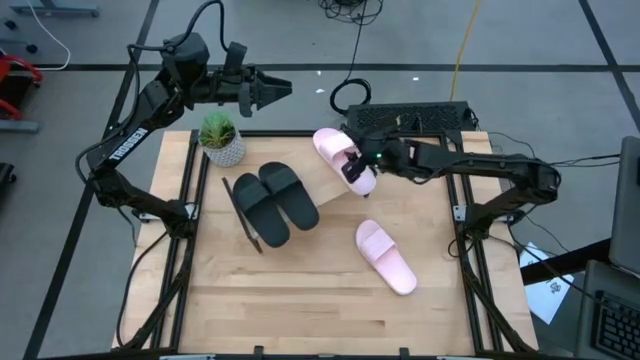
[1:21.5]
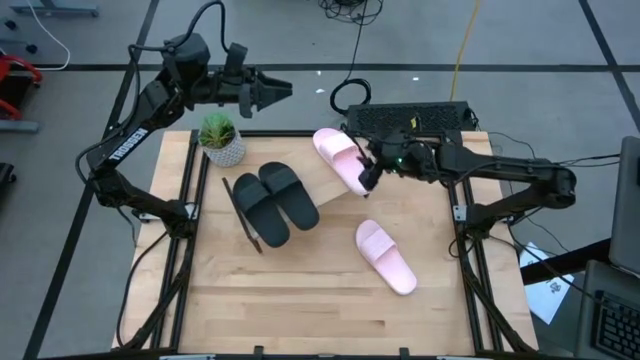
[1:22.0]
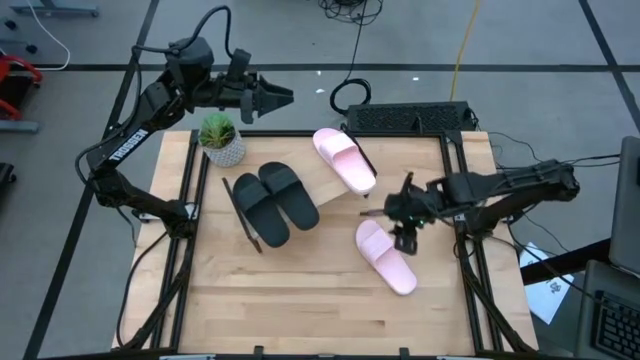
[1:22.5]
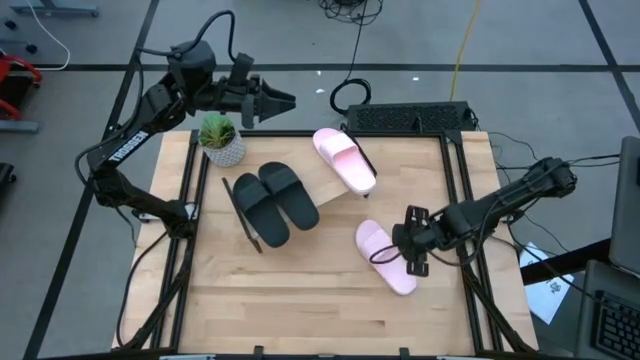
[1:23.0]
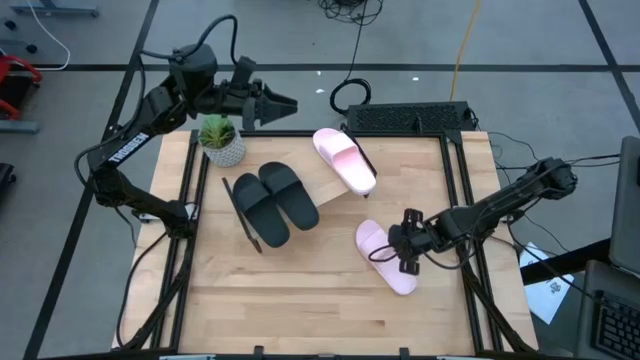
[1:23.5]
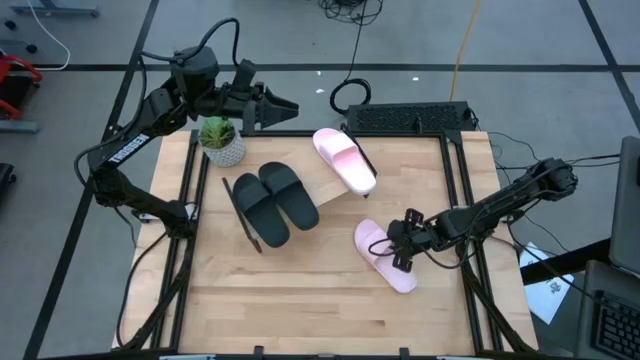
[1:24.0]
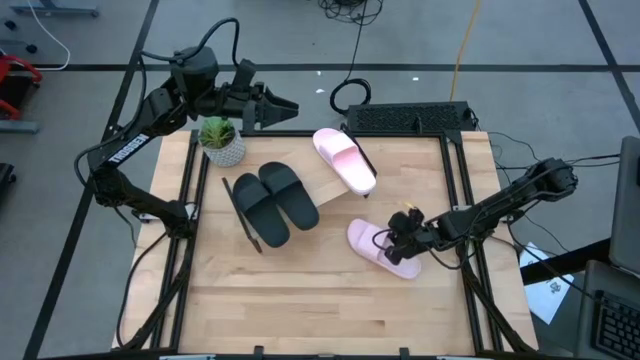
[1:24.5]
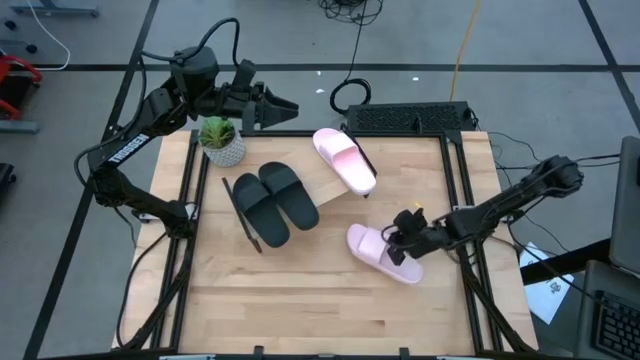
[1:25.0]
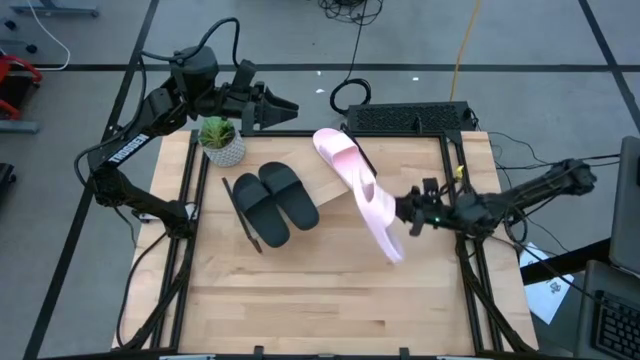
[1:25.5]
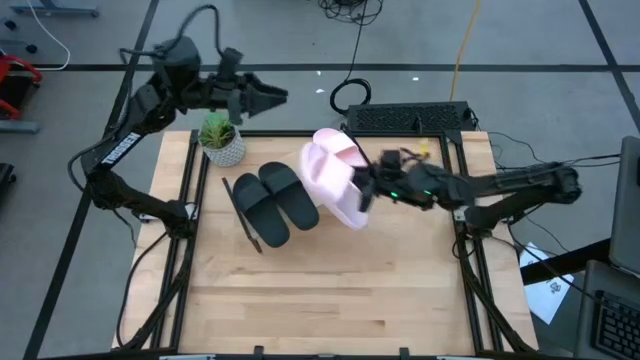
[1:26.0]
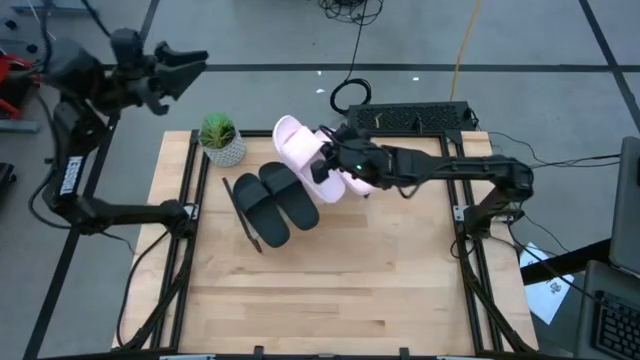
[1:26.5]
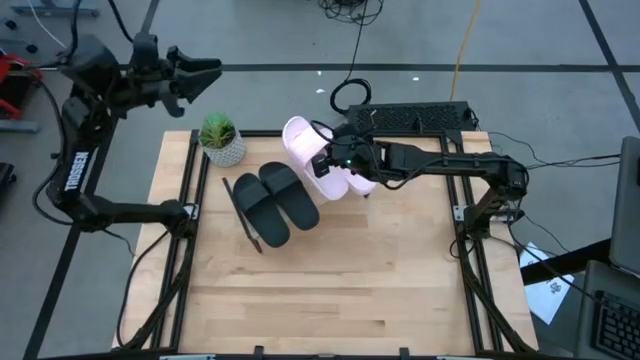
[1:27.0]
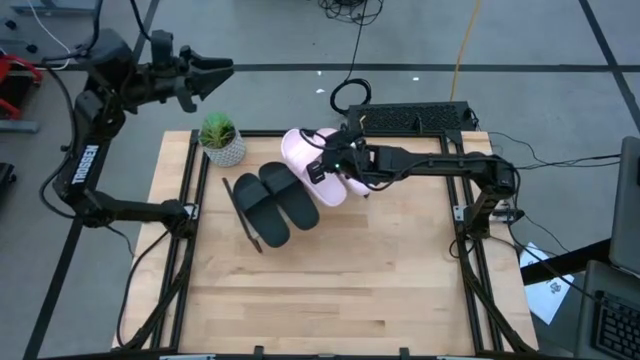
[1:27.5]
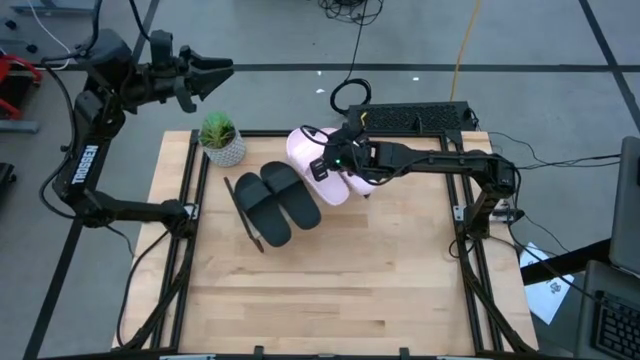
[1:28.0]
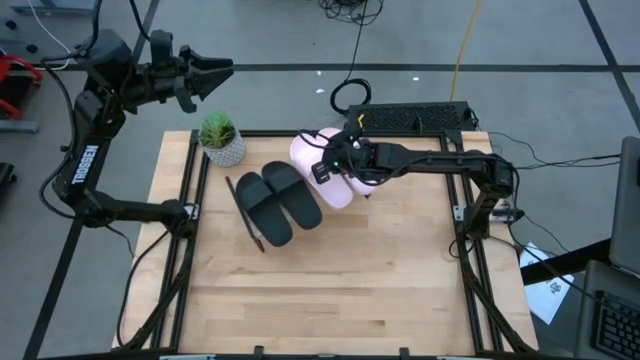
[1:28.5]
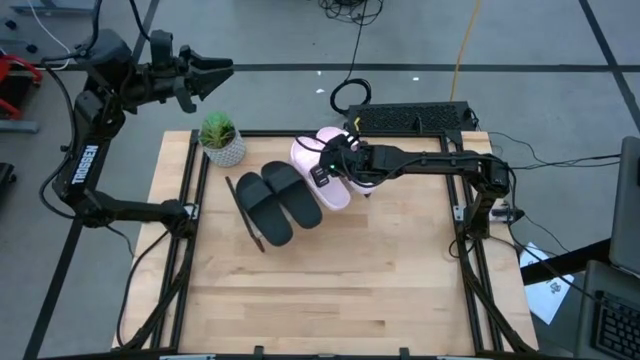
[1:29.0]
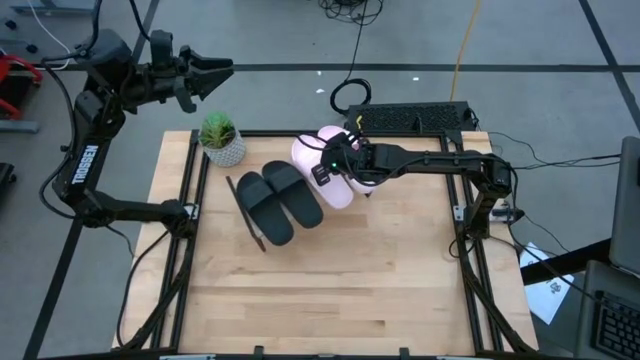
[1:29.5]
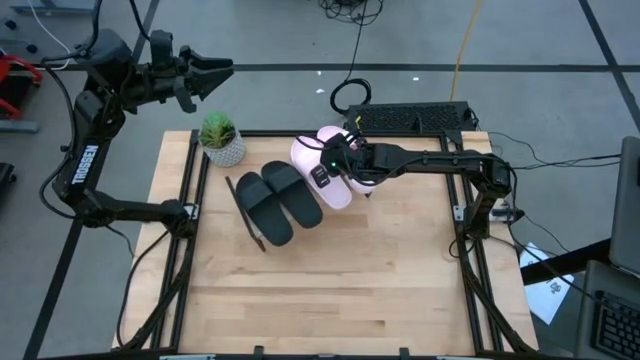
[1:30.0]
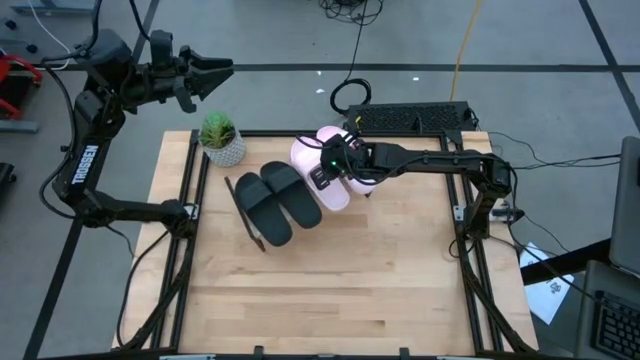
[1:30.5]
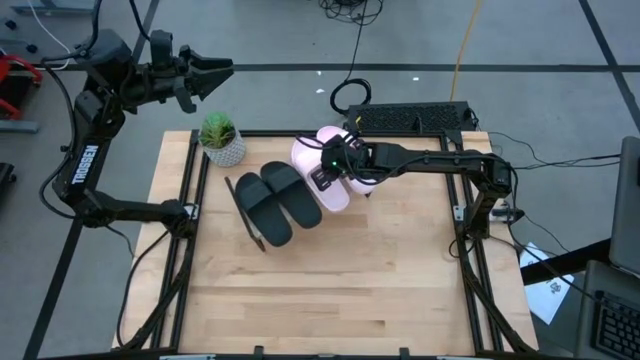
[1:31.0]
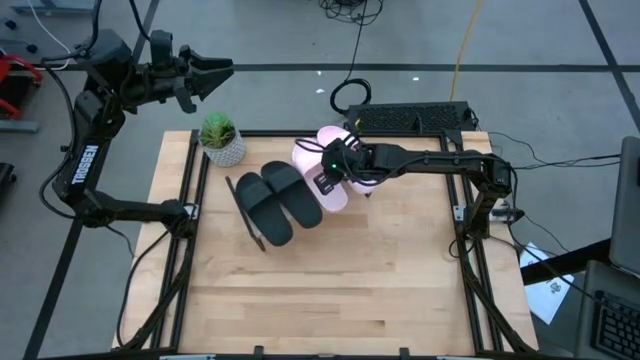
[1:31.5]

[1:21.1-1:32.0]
Task: Pick and place slides into the shelf
Put the pink slide on the shelf

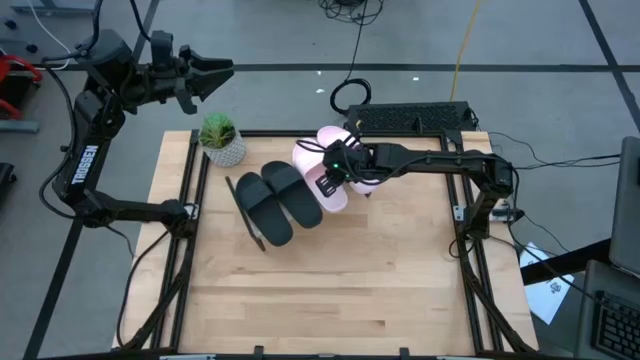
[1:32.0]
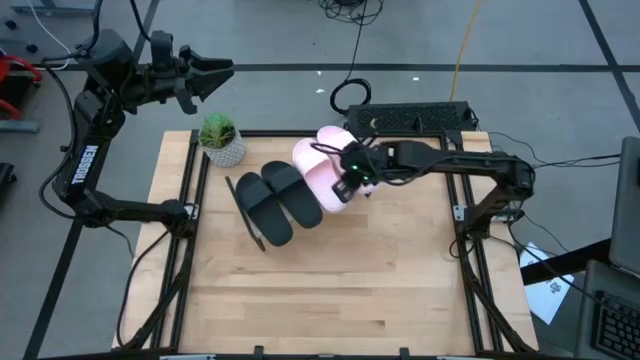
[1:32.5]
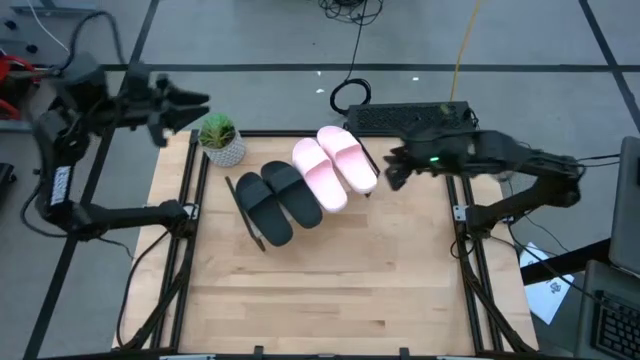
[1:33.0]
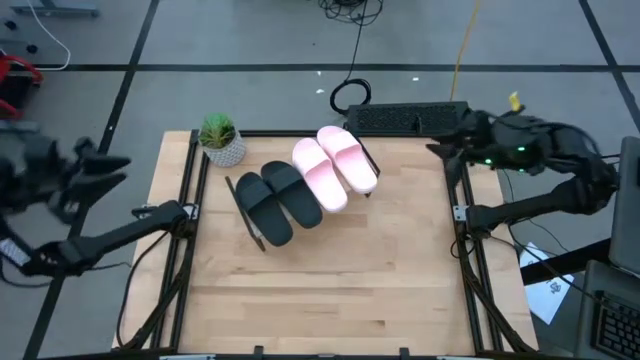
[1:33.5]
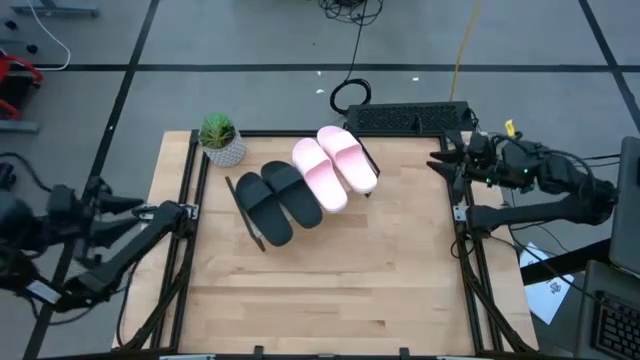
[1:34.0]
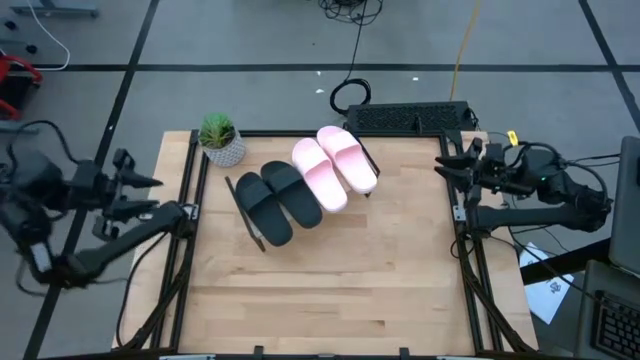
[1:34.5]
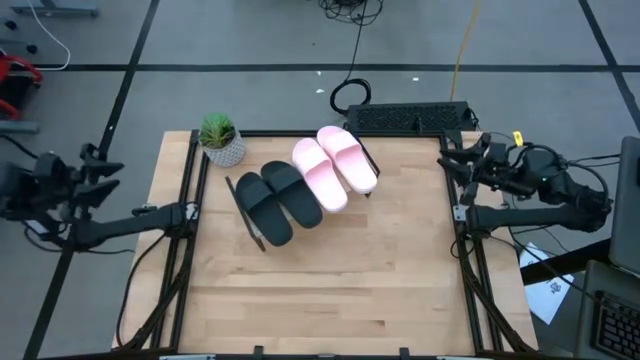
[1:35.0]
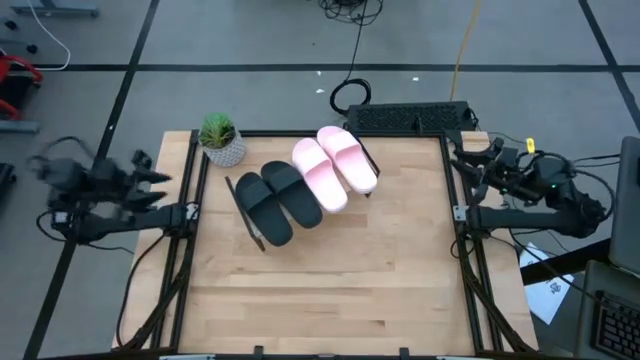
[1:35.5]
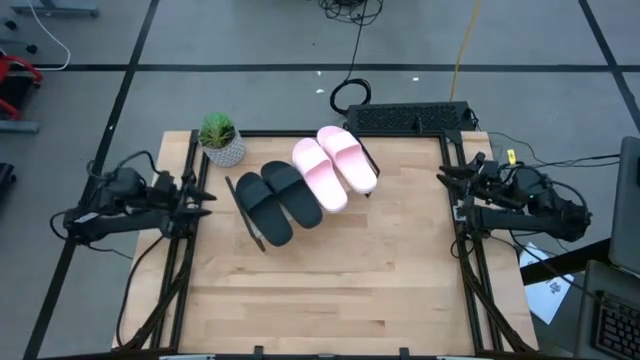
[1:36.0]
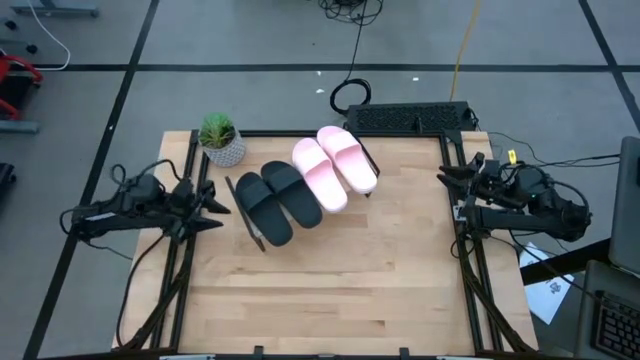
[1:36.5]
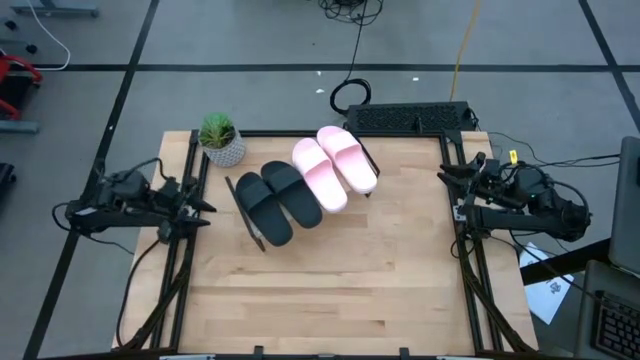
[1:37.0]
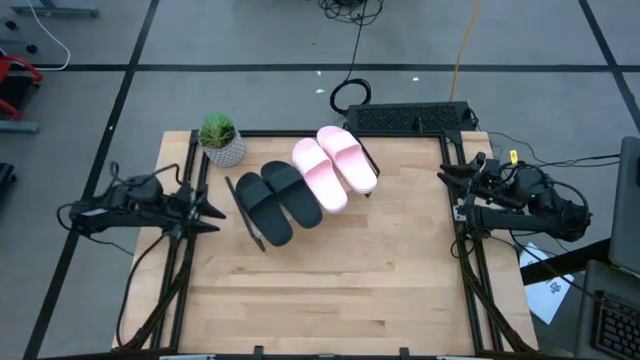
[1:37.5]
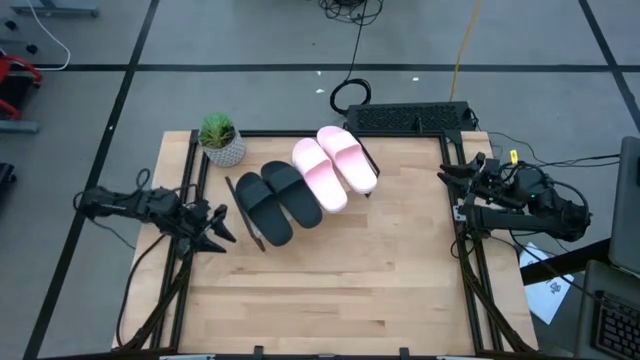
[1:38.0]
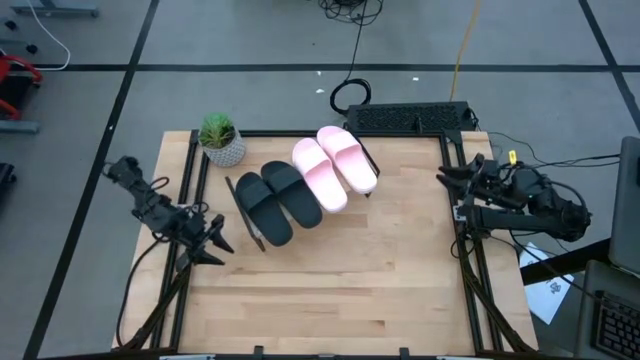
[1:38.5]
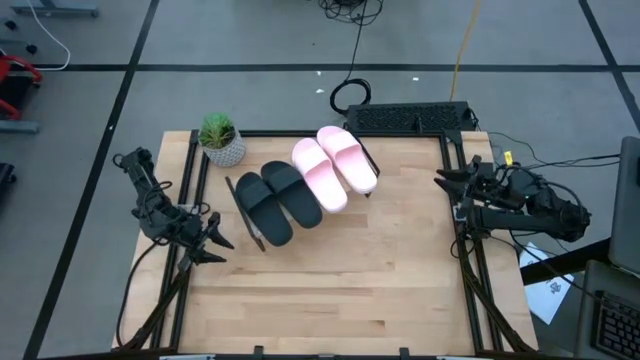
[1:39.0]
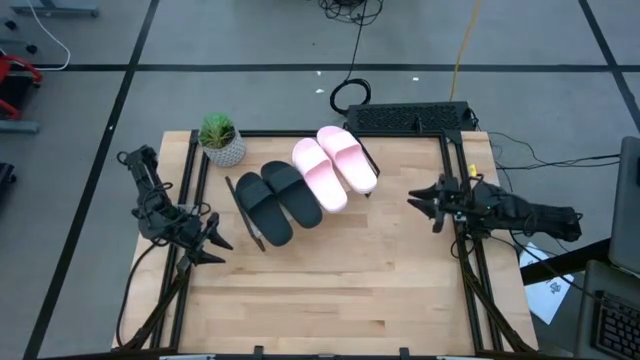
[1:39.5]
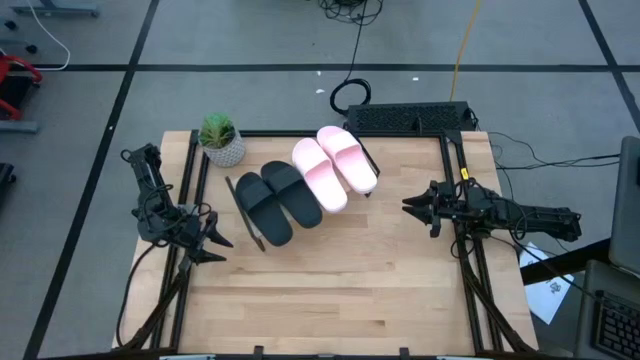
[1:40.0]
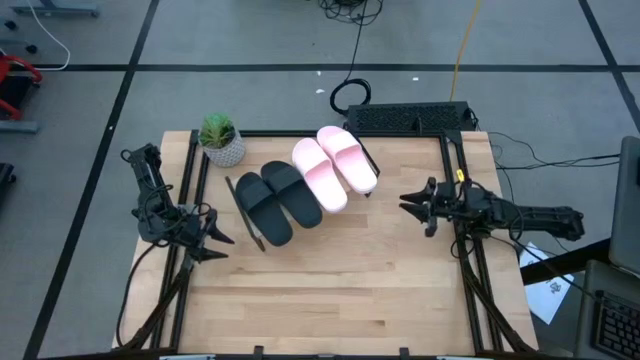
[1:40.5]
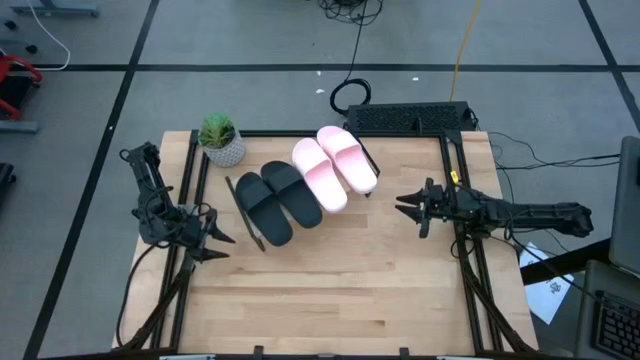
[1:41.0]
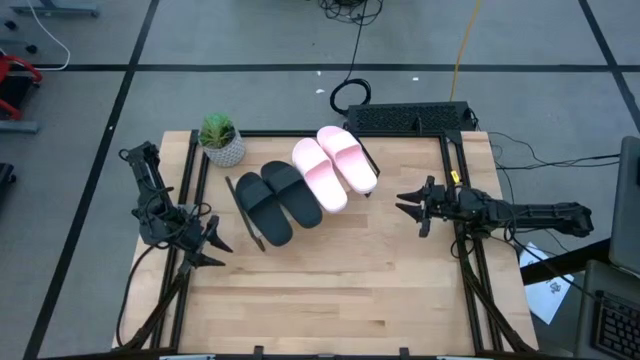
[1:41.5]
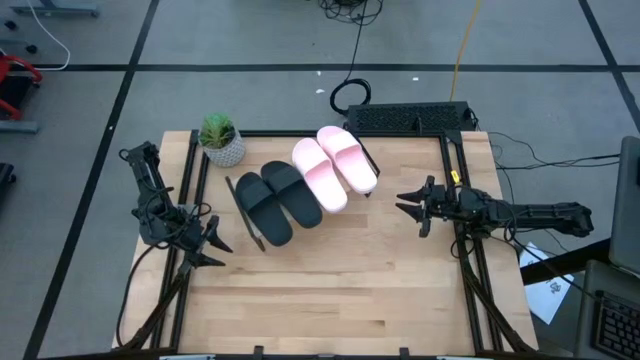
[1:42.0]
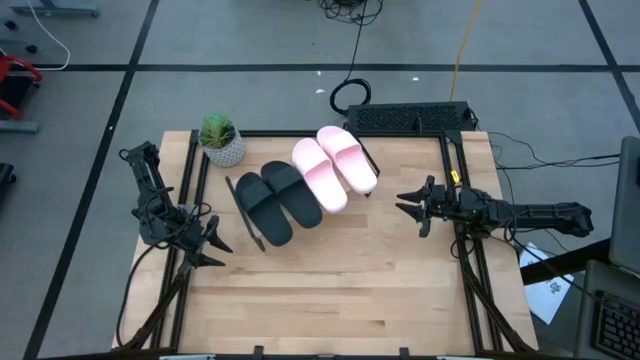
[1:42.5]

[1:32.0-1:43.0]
Return to Home Position
